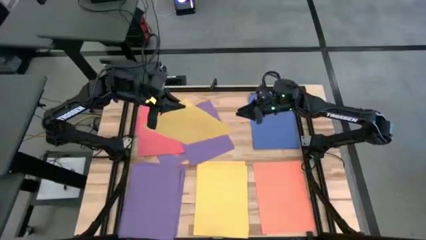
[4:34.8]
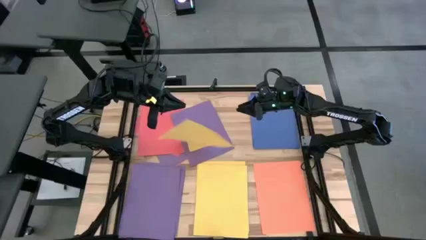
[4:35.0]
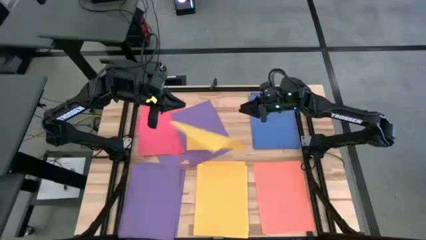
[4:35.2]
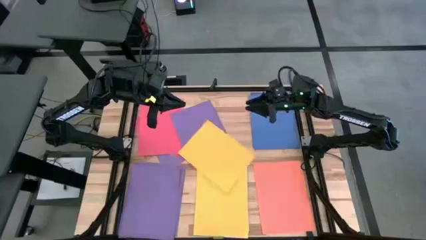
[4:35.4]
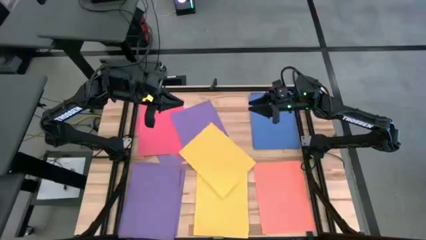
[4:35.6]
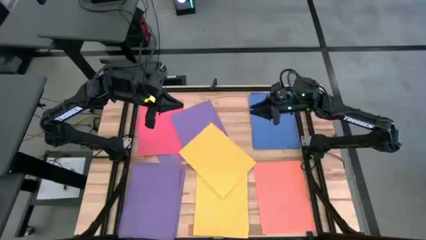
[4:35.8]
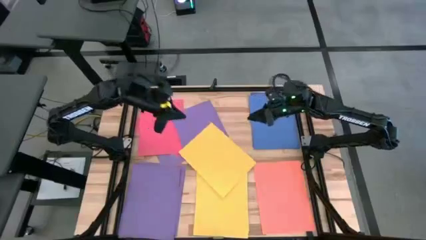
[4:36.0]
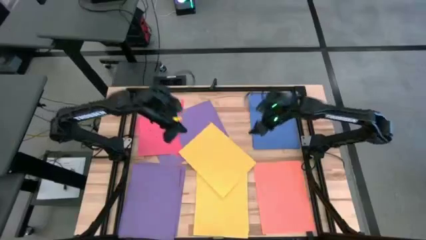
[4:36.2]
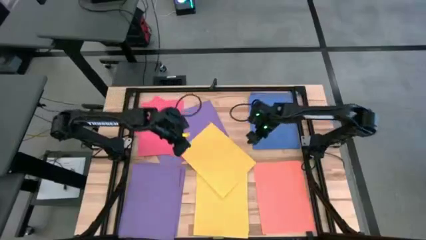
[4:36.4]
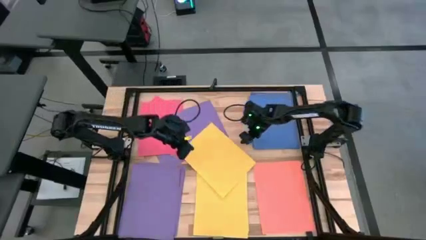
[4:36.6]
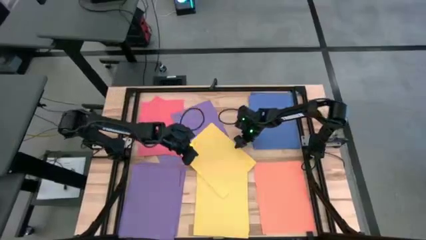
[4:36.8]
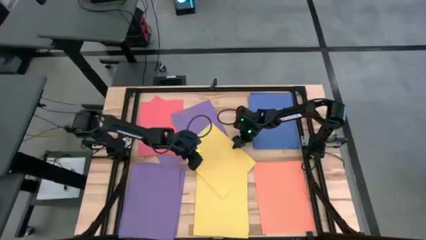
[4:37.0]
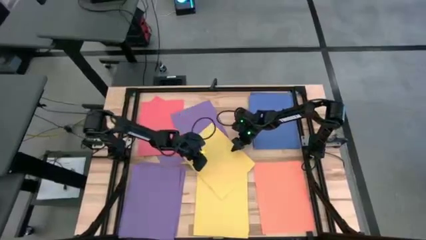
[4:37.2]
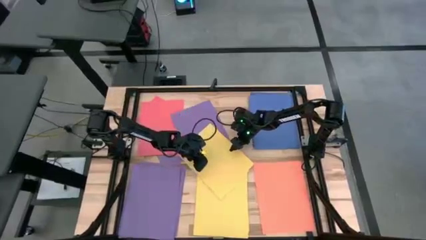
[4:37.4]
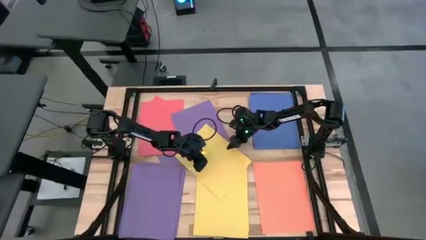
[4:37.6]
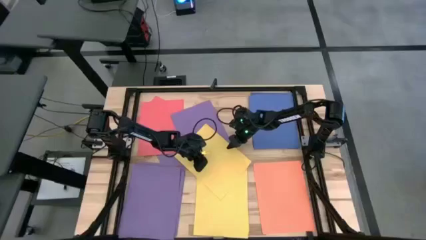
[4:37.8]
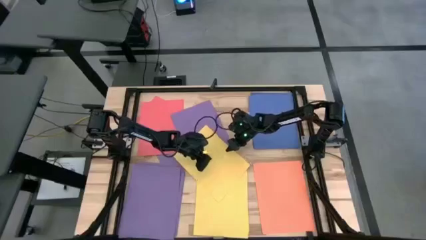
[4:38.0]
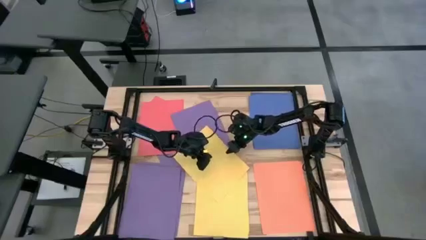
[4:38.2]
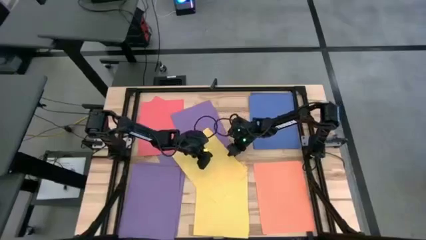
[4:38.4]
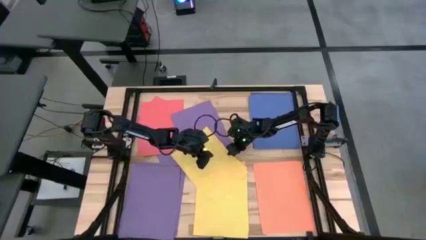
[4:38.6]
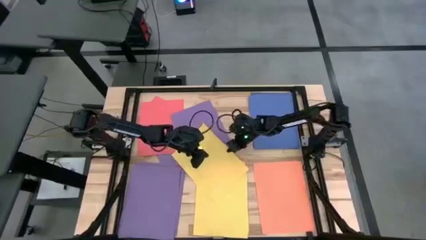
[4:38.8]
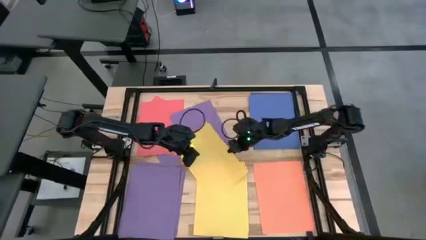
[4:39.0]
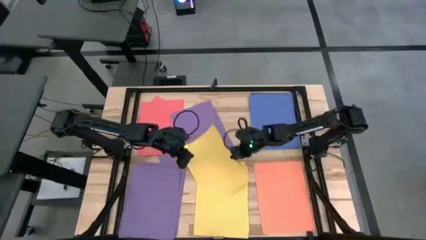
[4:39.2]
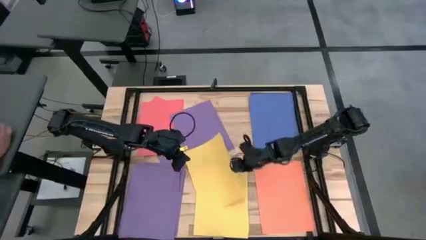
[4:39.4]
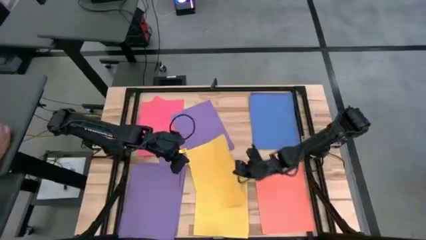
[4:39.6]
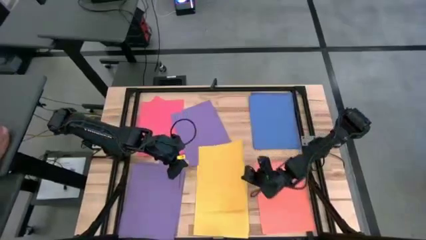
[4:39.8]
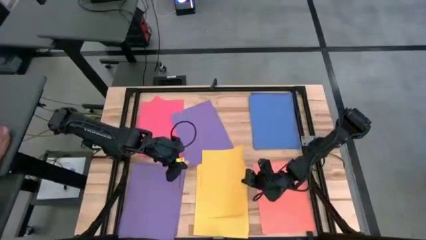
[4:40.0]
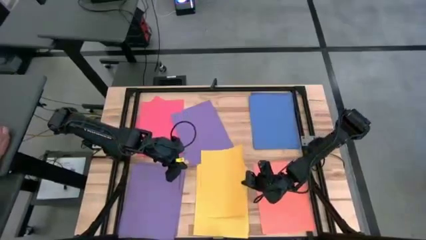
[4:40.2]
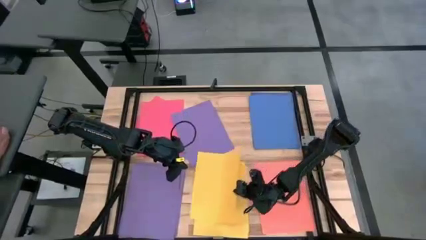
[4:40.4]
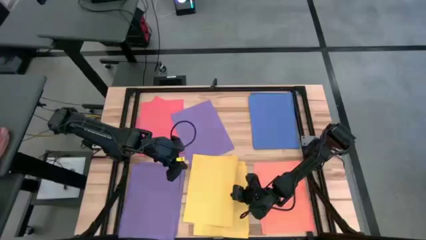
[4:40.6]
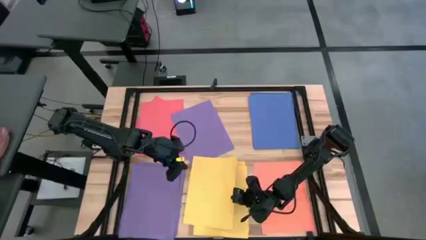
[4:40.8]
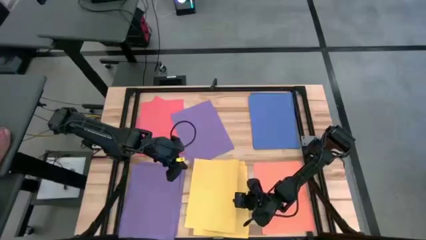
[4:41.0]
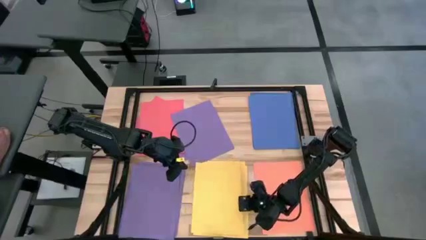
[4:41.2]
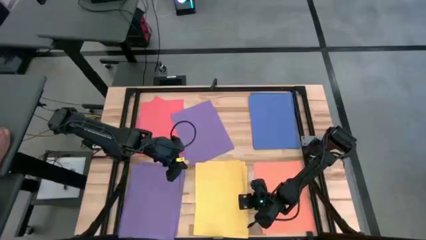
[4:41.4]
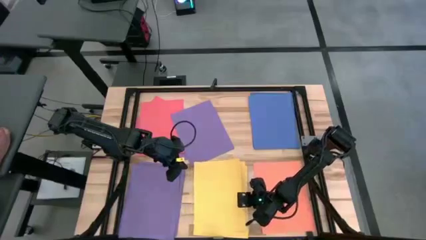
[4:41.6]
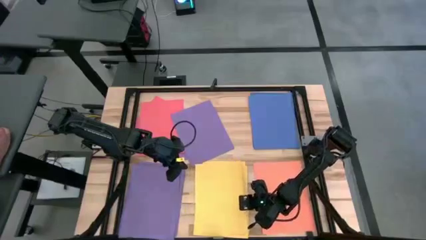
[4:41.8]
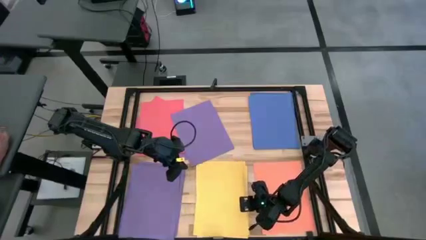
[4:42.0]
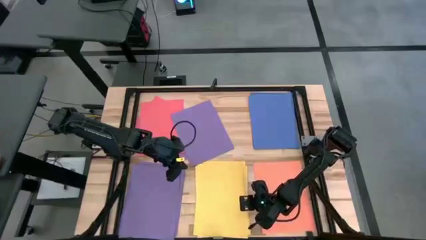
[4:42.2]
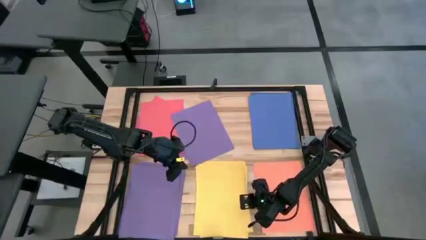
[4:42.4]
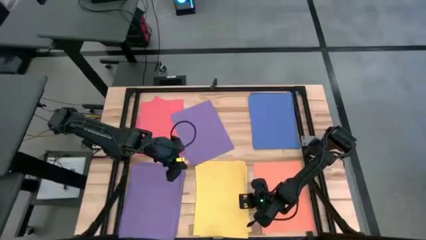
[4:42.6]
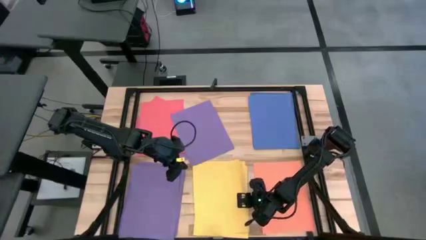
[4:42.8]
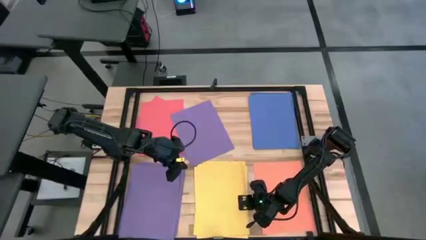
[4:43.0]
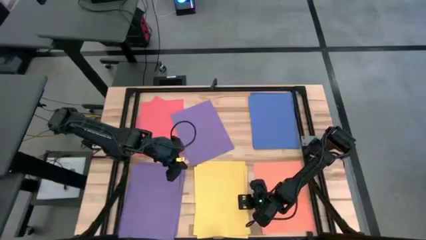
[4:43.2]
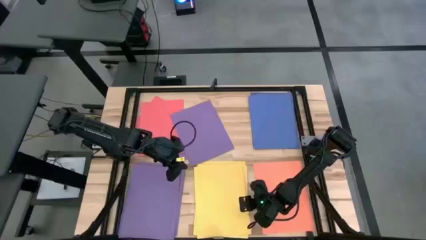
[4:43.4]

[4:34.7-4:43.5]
Task: Organize paper
Stack the yellow paper on top of the yellow paper

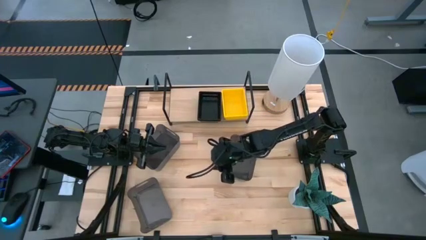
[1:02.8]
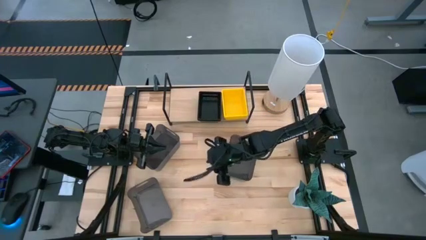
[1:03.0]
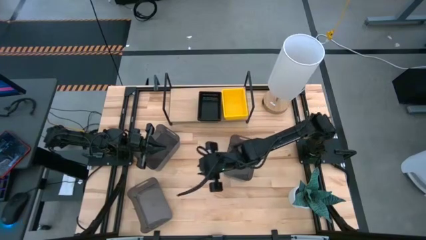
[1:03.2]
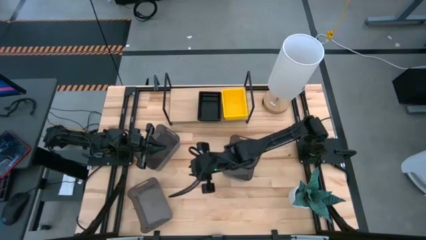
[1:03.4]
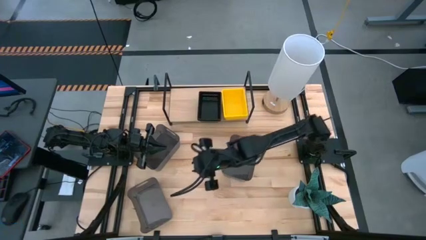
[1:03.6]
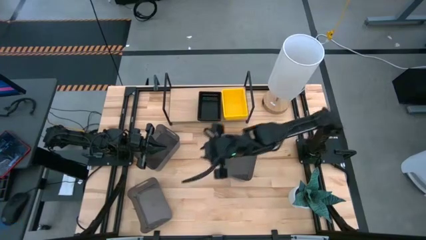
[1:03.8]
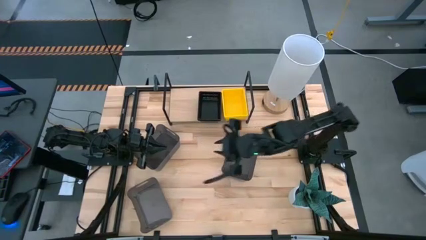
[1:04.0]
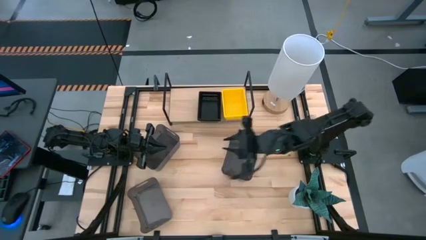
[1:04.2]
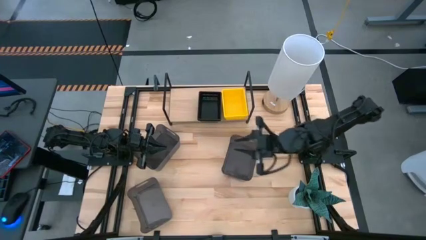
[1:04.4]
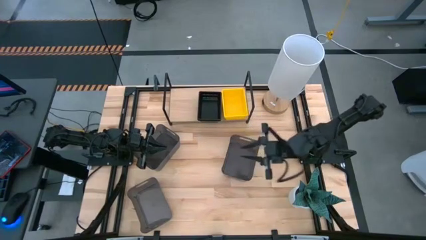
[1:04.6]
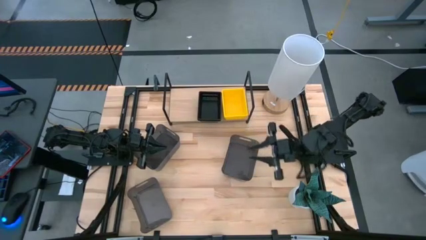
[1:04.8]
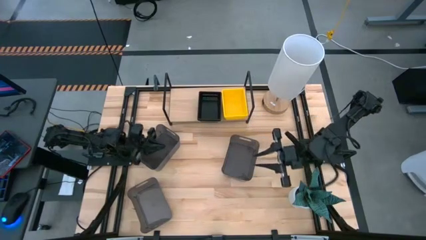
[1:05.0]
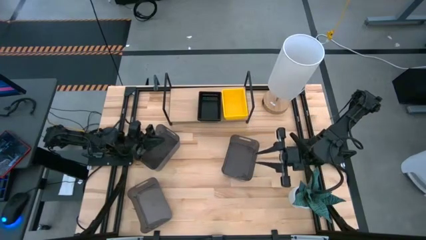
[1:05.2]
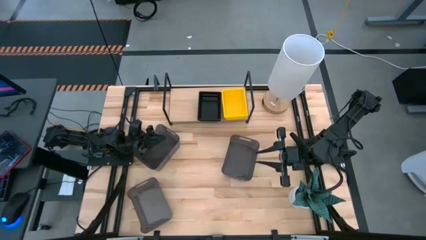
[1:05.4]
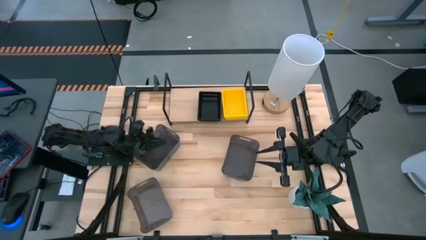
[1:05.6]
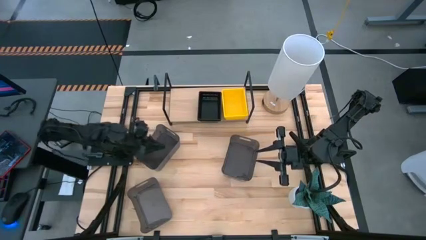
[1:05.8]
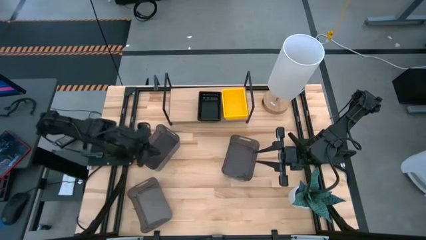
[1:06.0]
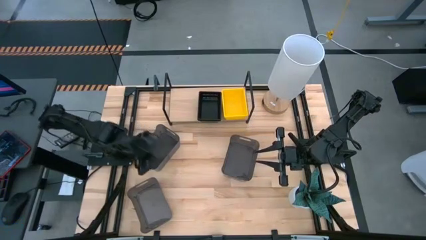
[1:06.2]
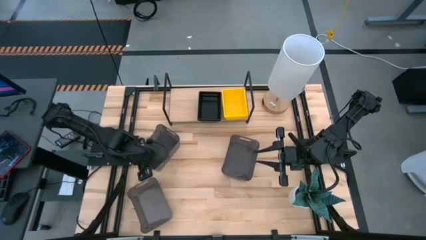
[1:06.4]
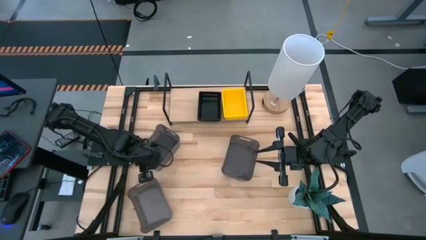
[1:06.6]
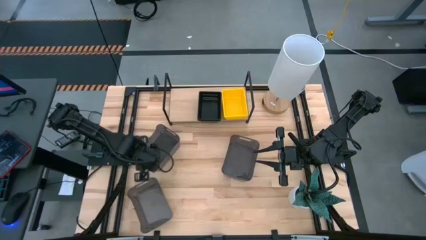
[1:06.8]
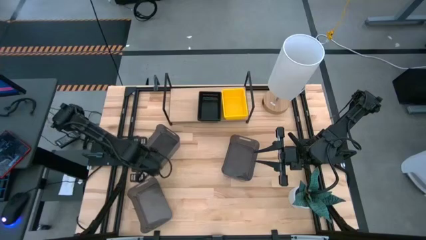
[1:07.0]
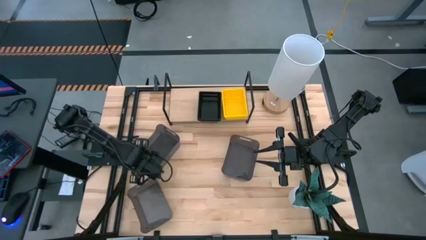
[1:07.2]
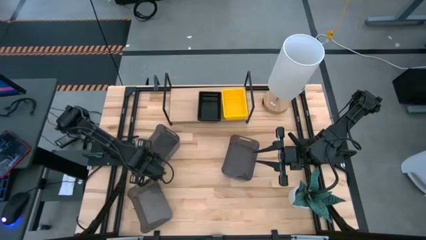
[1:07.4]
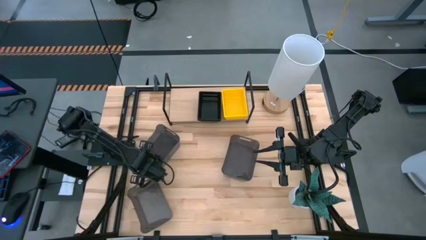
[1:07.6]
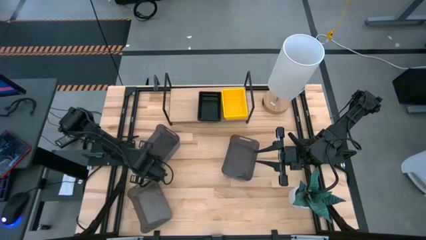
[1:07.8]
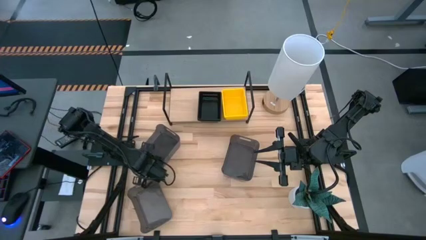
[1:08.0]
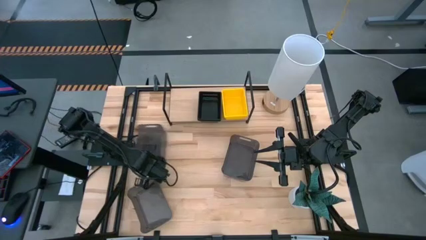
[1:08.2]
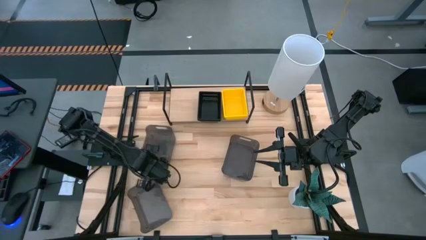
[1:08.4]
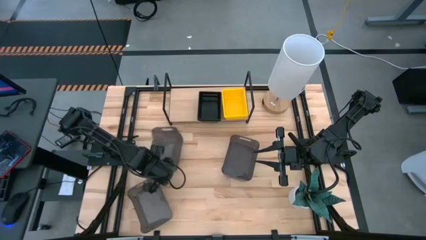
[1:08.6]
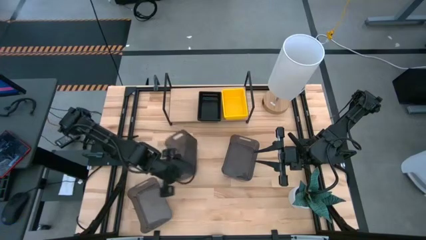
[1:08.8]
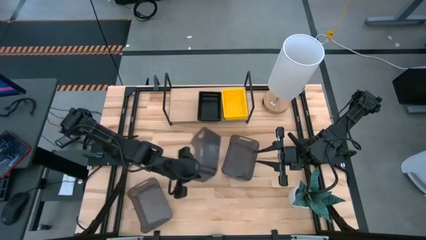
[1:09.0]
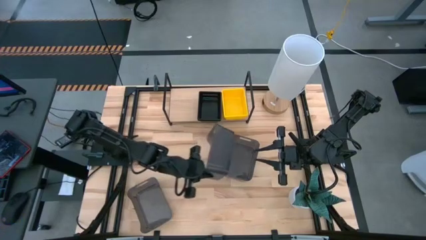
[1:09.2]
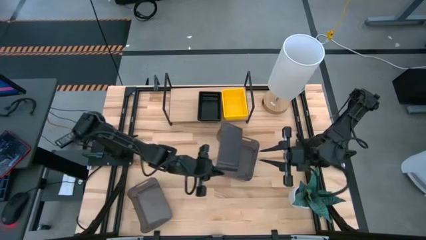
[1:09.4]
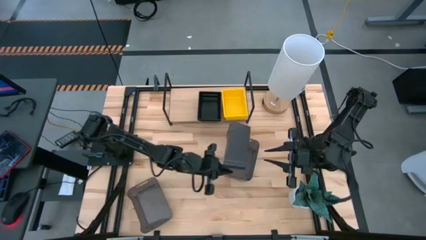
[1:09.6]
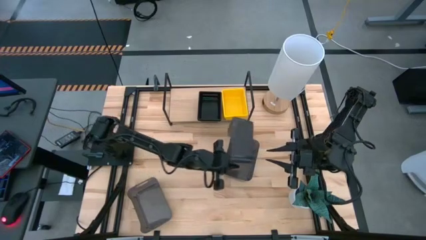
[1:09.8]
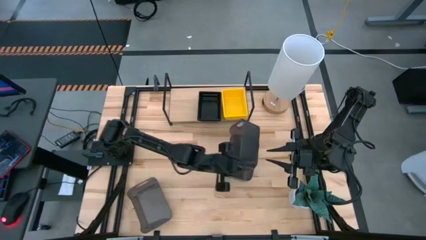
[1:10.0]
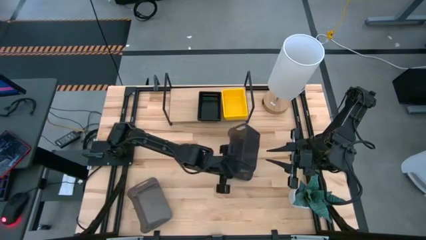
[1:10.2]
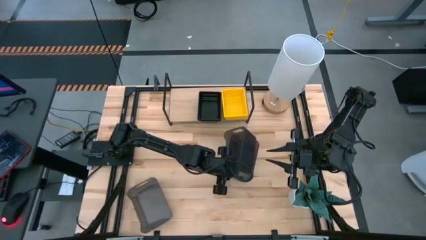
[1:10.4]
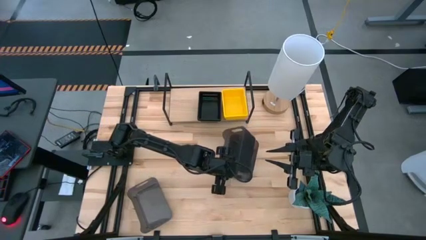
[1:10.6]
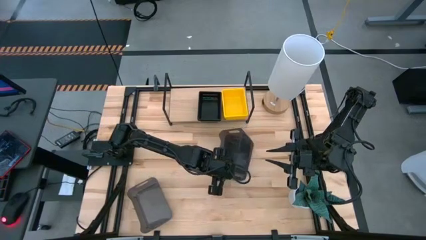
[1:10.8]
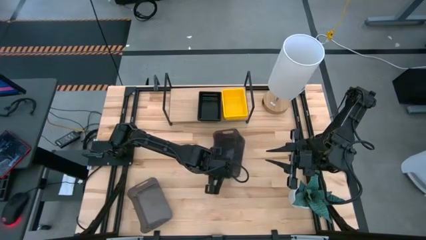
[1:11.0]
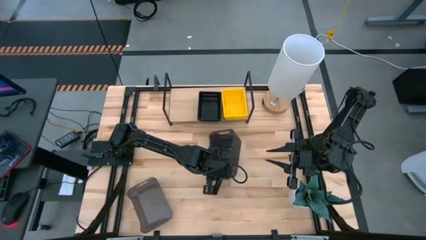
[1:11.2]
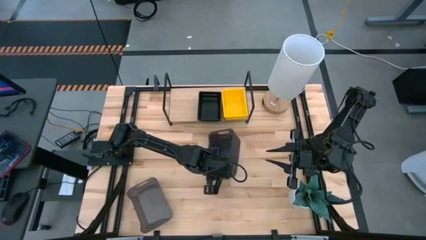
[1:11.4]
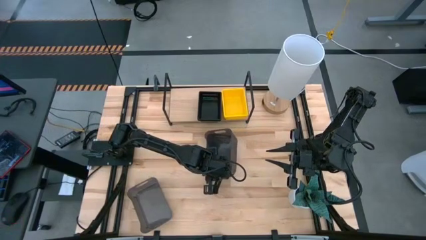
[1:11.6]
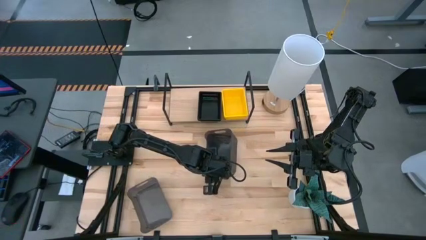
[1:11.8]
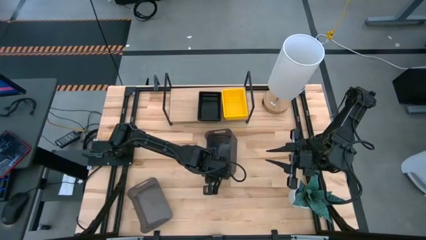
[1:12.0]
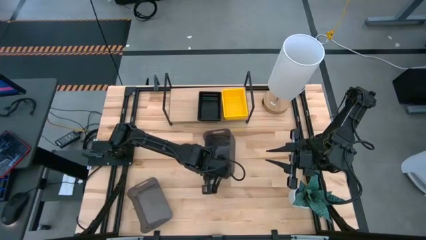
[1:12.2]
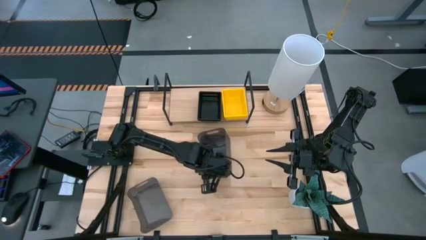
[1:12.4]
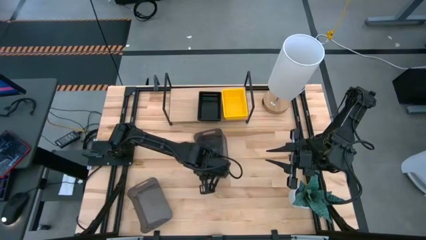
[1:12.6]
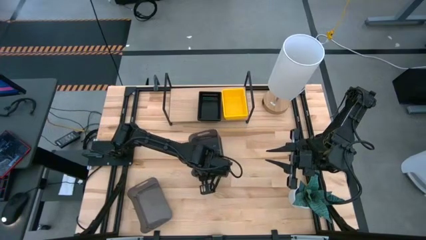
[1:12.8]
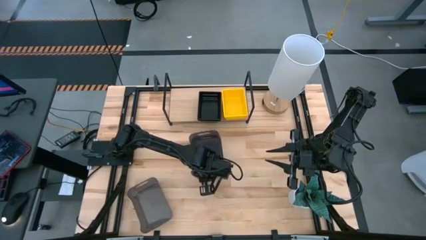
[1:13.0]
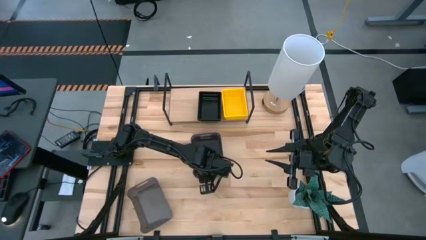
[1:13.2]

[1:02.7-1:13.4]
Task: Stack baskets on shelf by color
Stack the top left gray bin on top of the right gray bin
